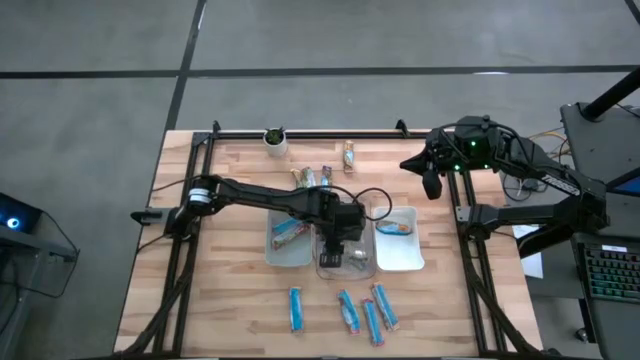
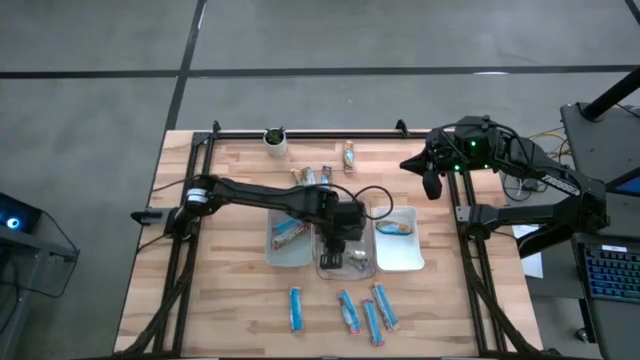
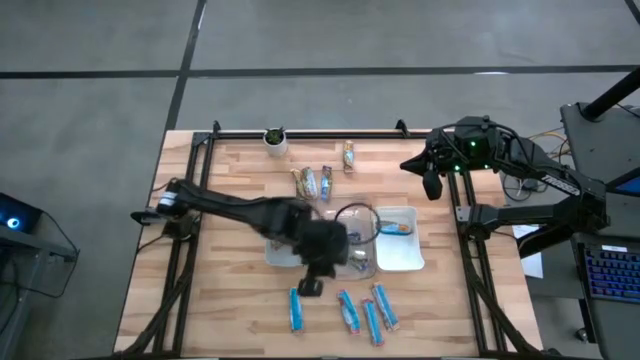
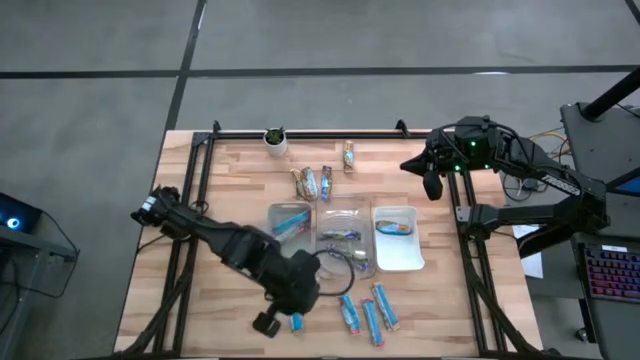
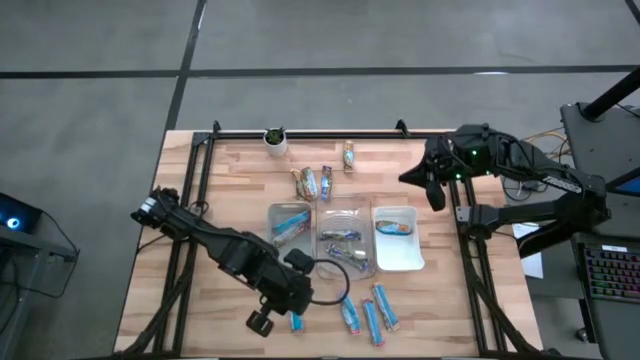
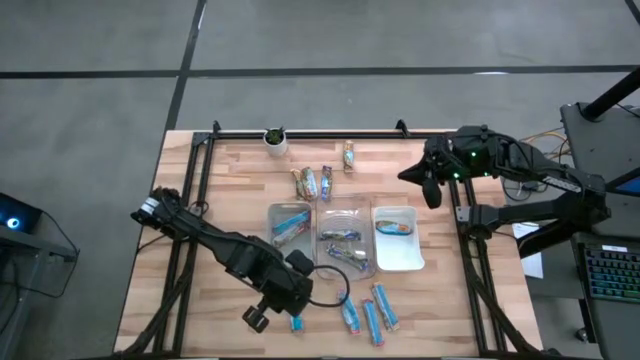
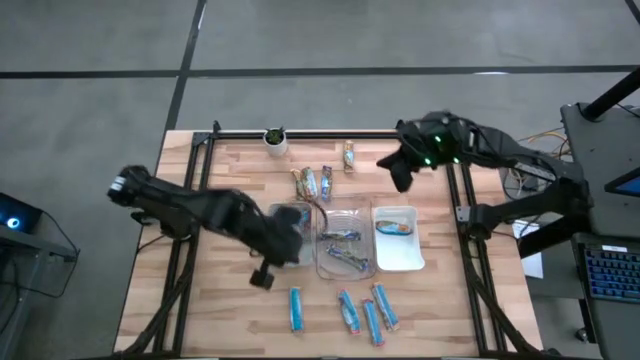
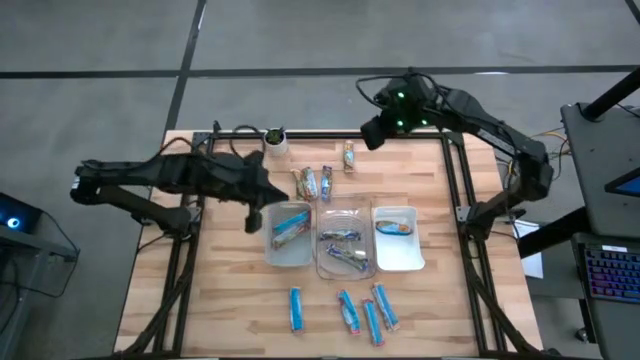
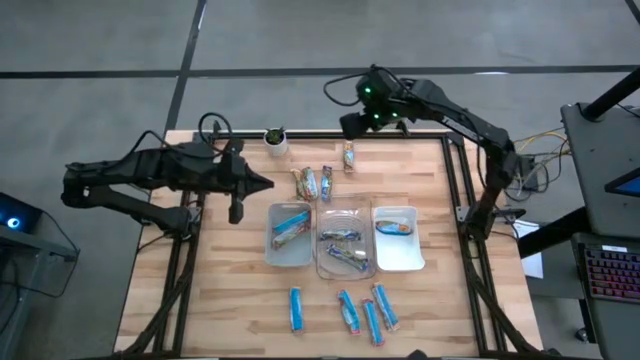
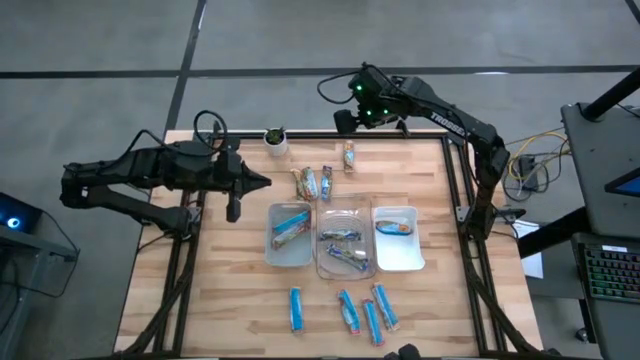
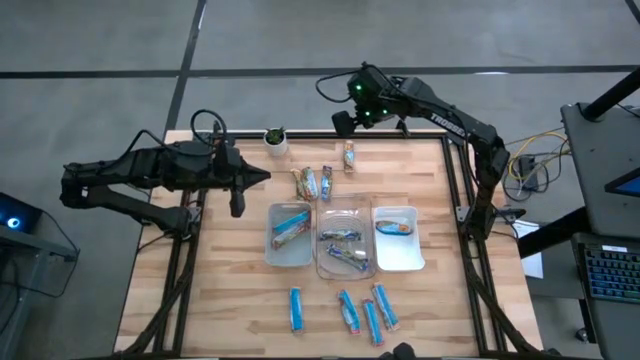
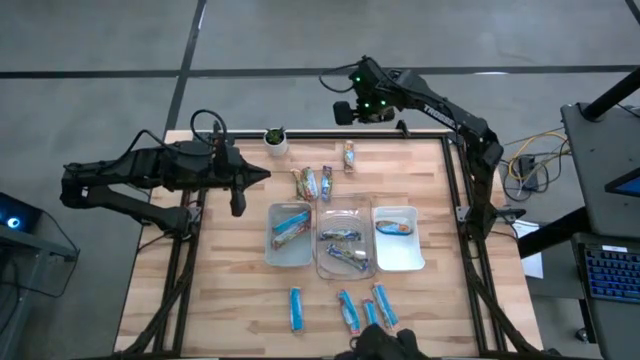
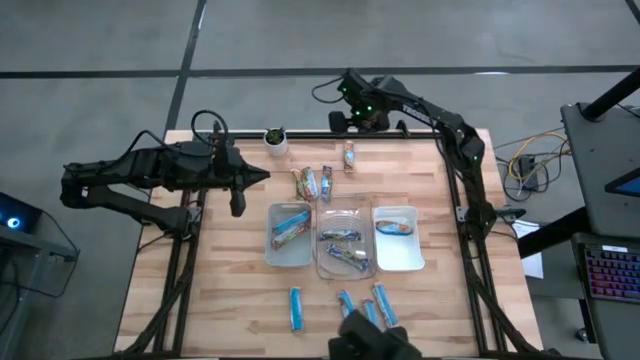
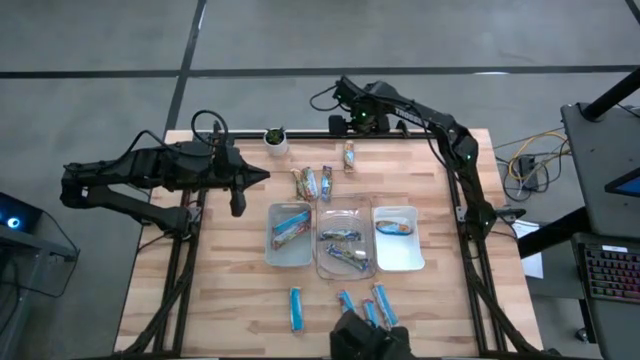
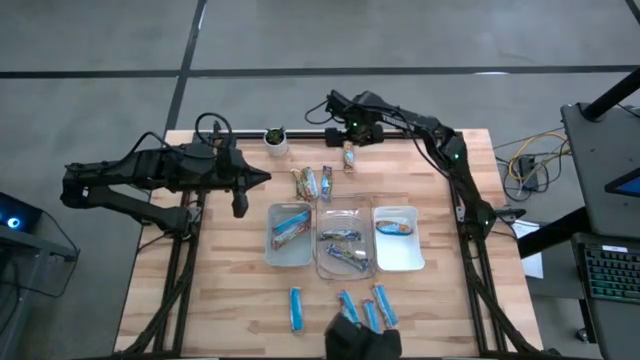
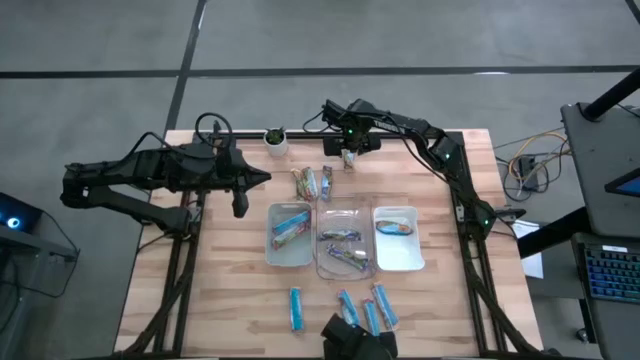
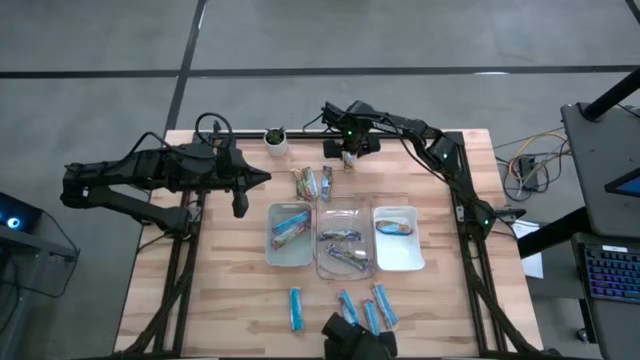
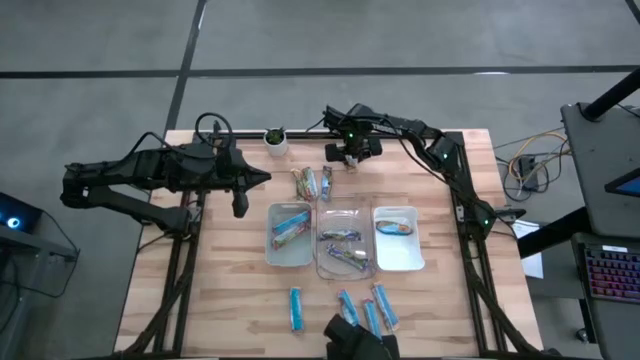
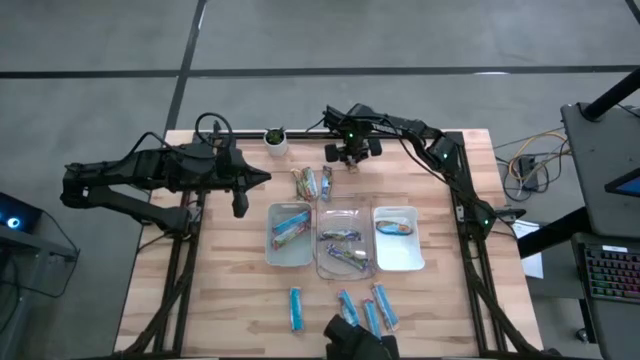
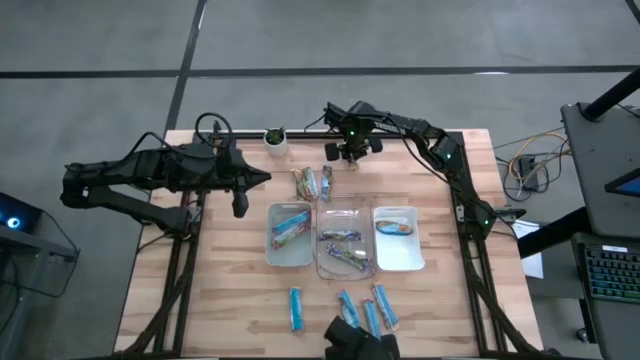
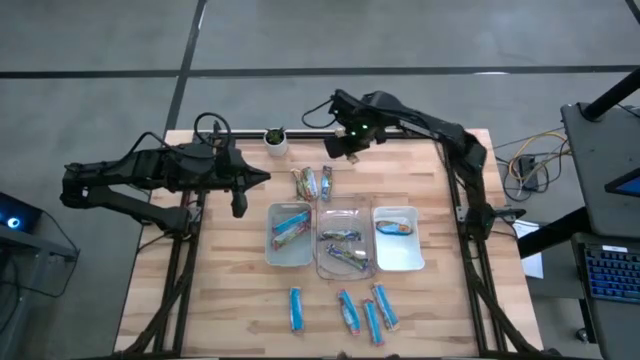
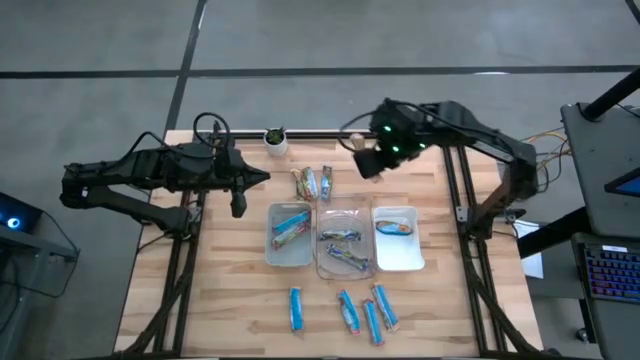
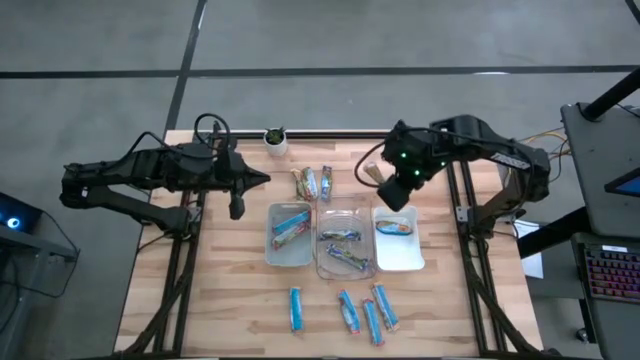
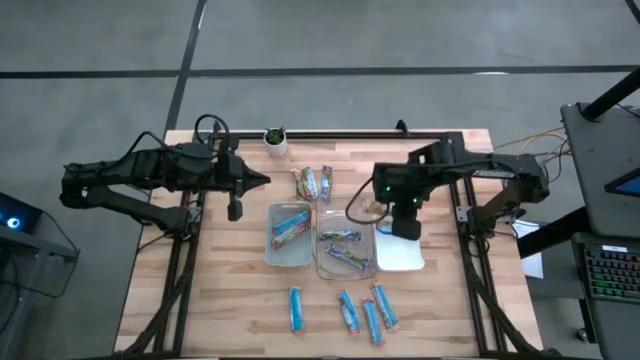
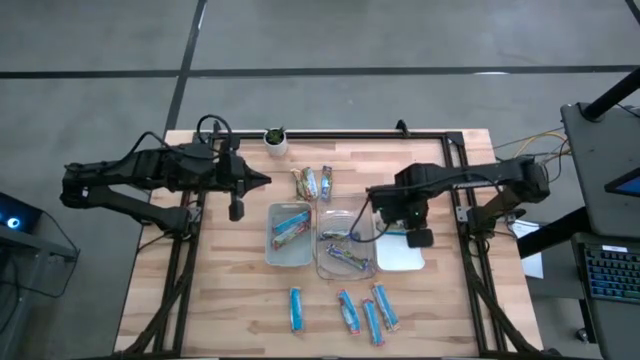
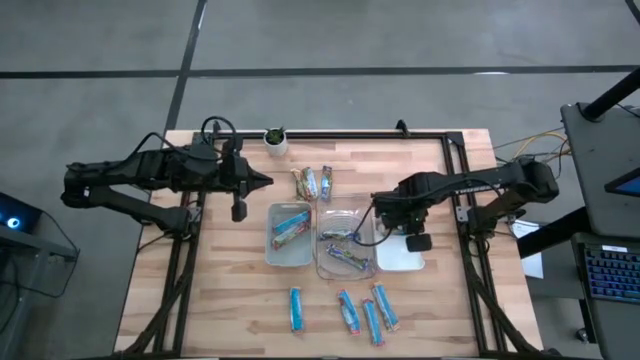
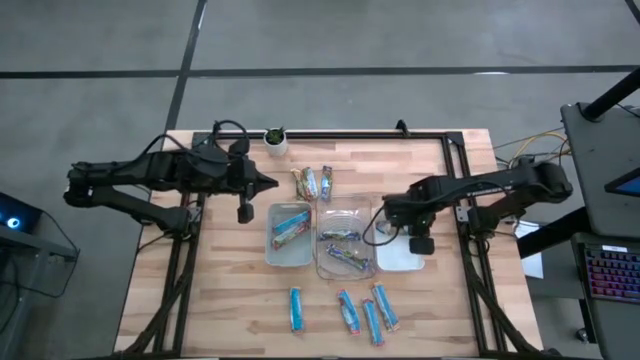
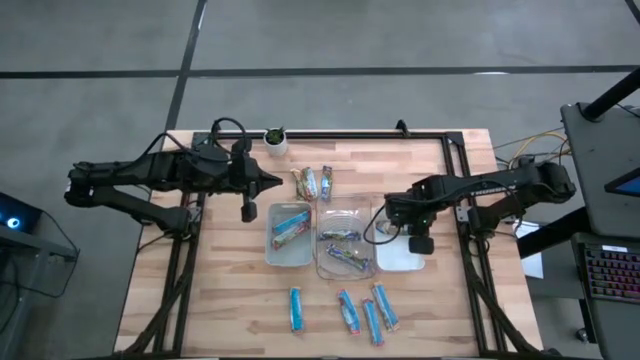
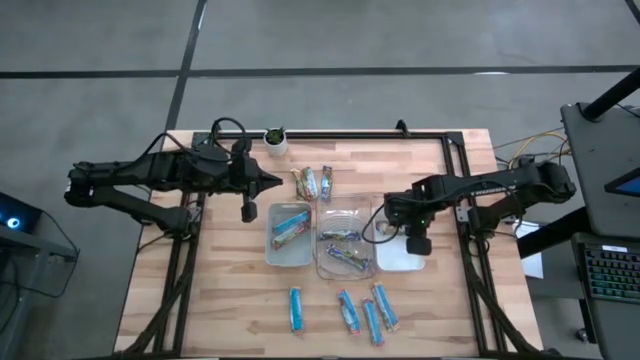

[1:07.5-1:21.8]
Task: Pick and place Granola Bars by type
Put the yellow granola bar into the white bin

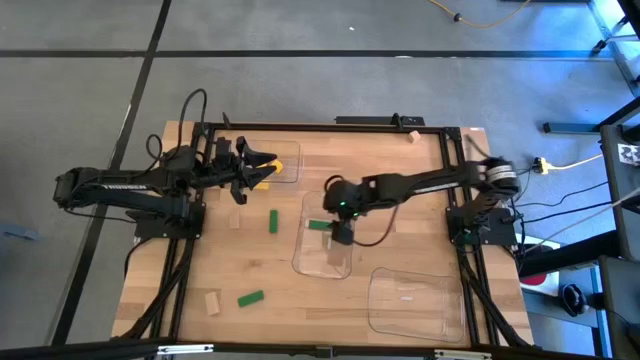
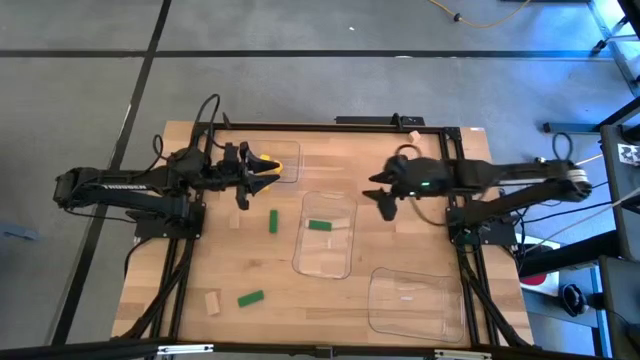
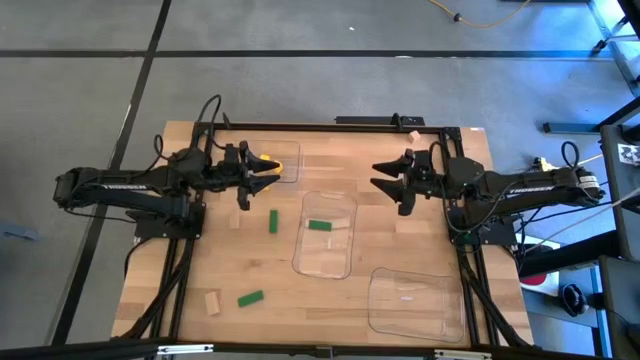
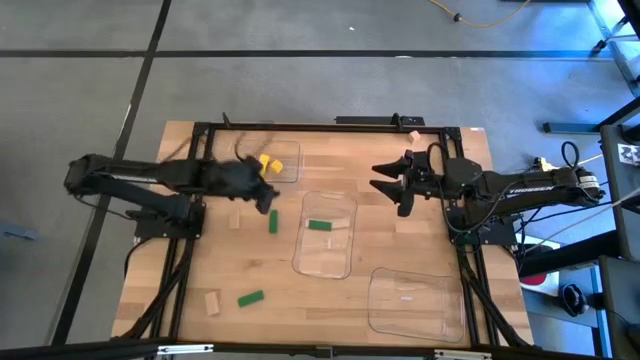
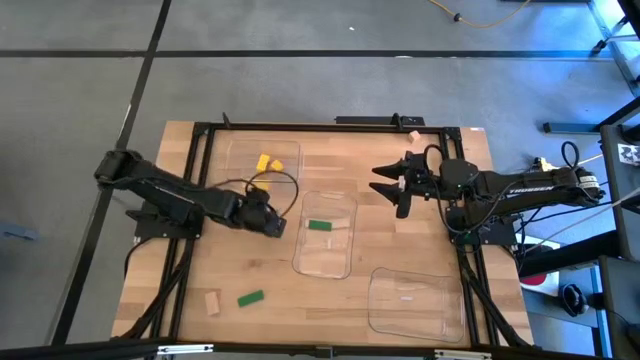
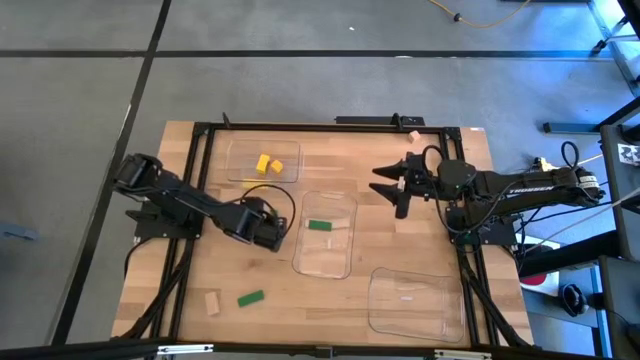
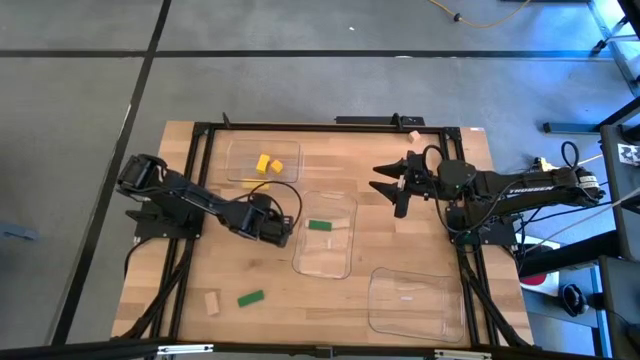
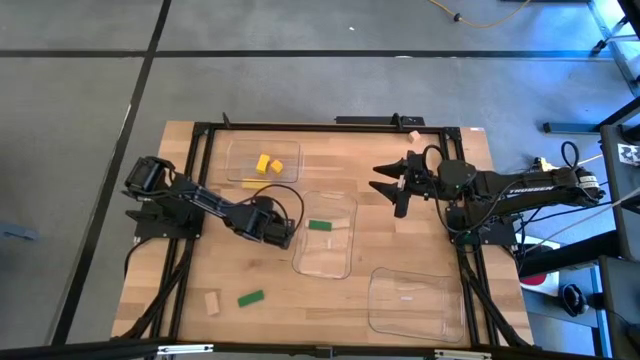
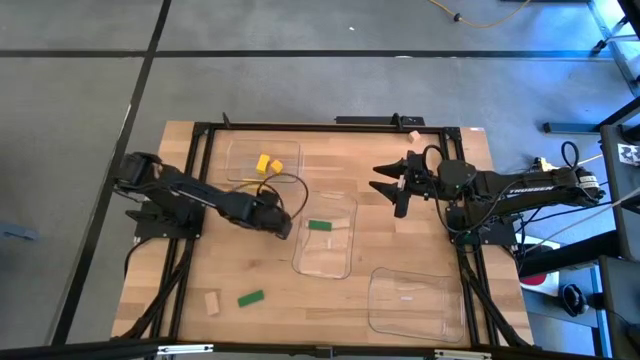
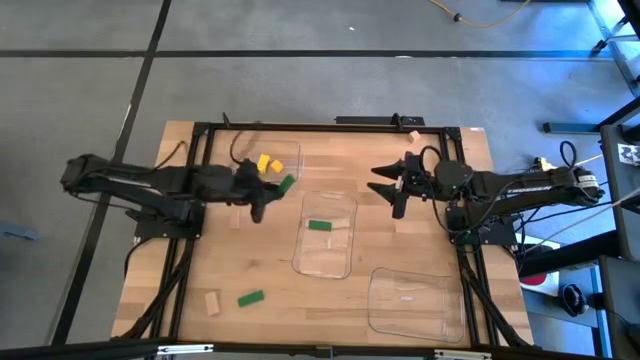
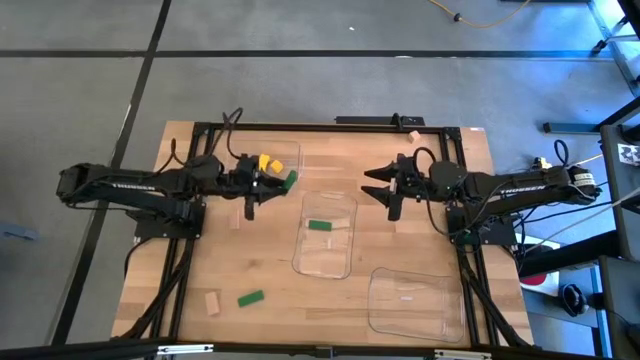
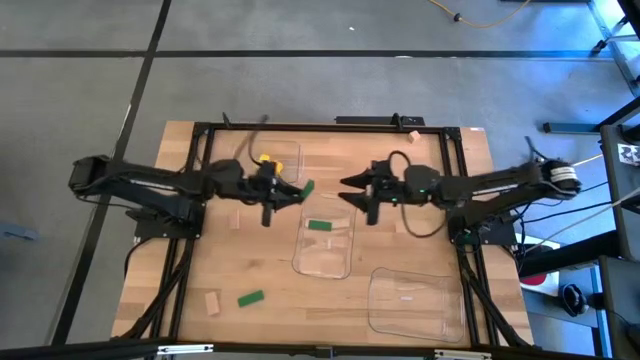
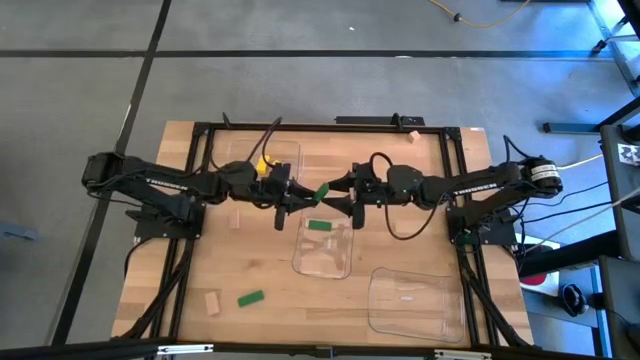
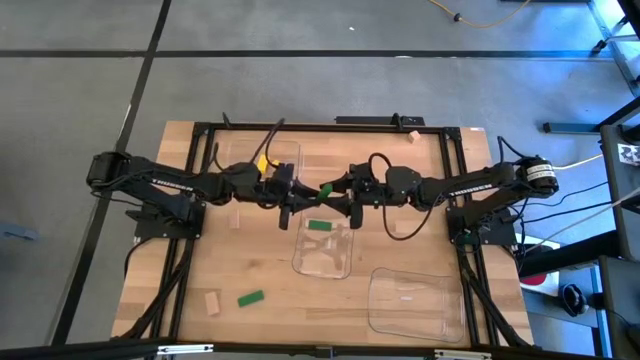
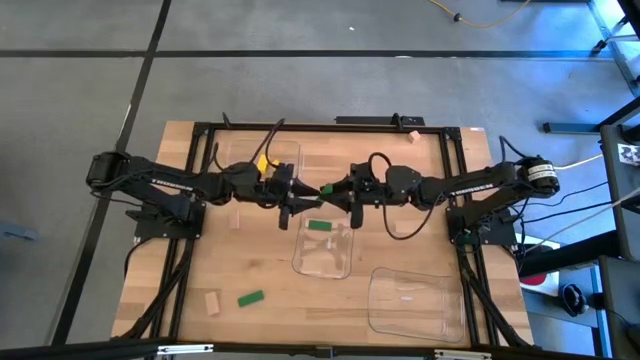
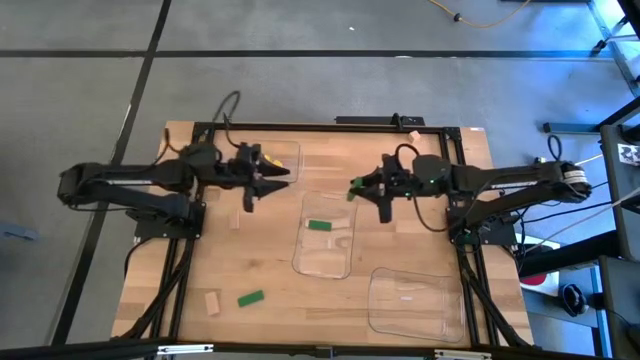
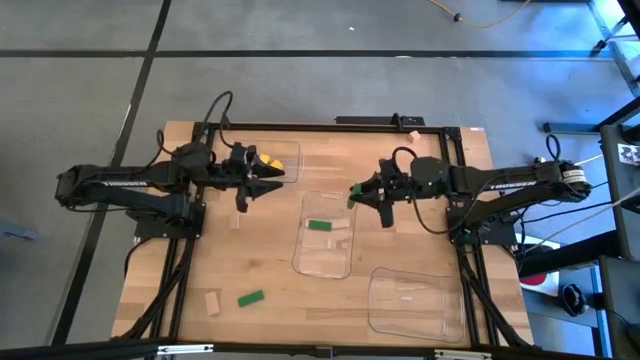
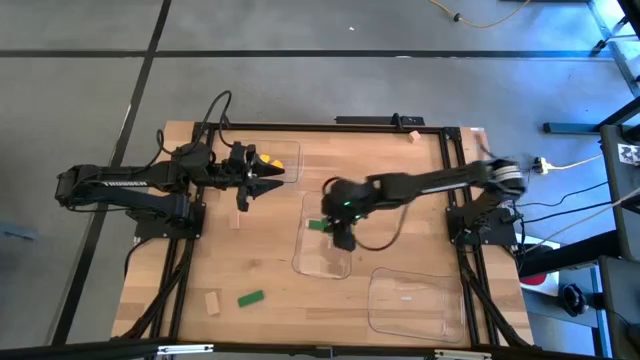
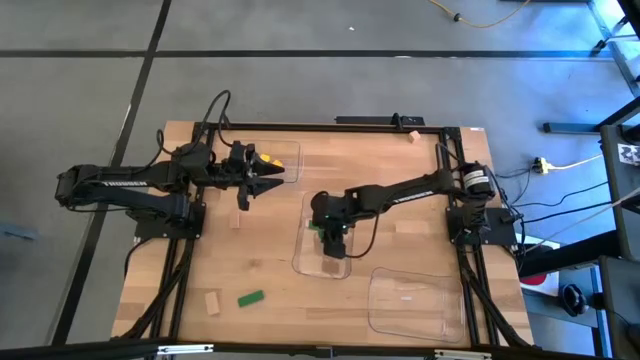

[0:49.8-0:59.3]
Task: Sort & place blocks by color
Put the top green block into the middle transparent bin
